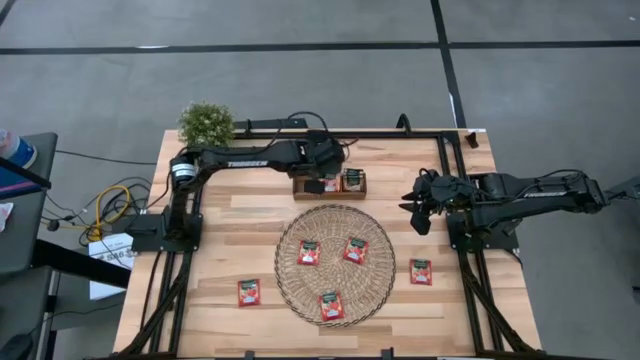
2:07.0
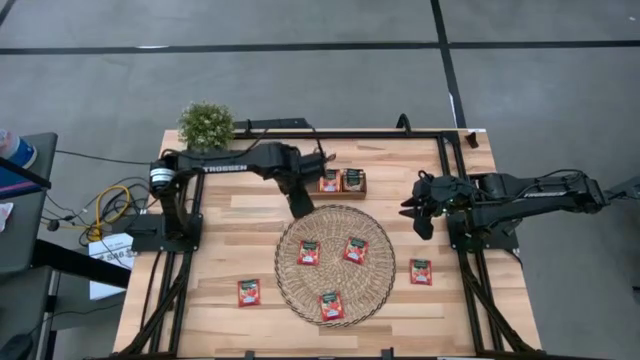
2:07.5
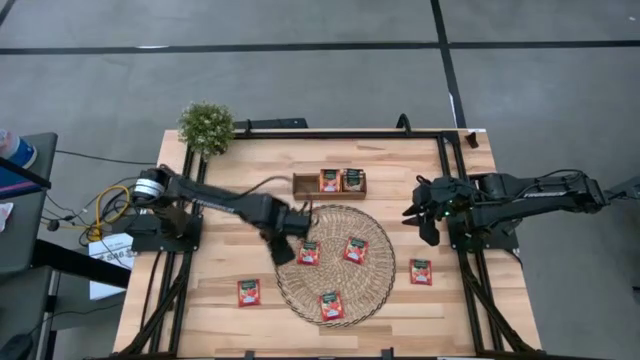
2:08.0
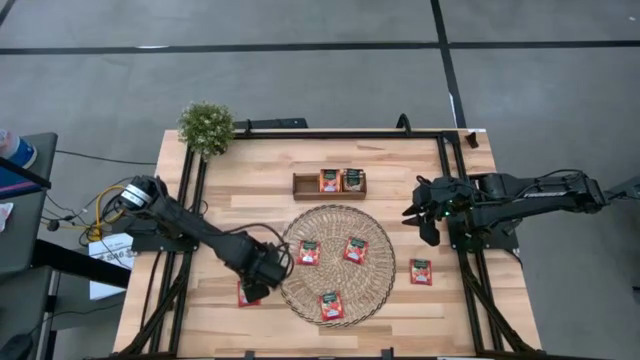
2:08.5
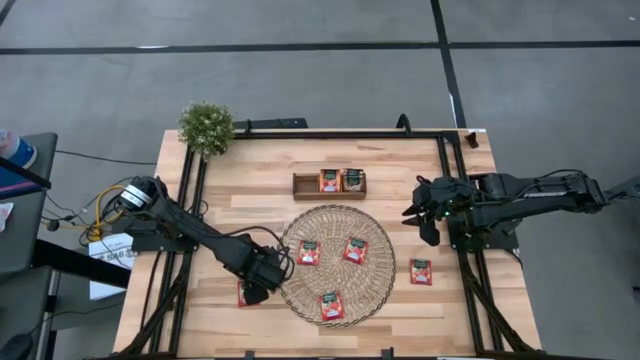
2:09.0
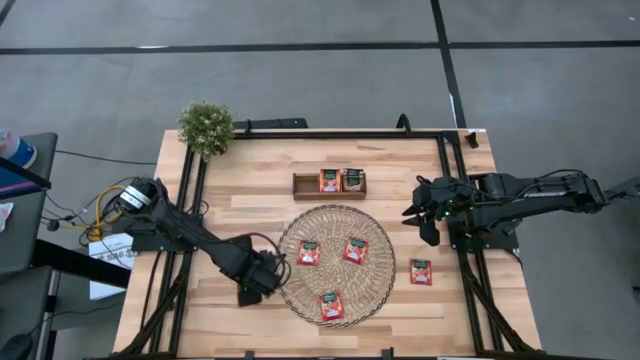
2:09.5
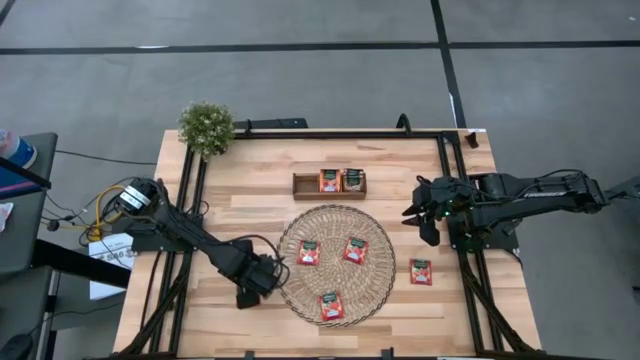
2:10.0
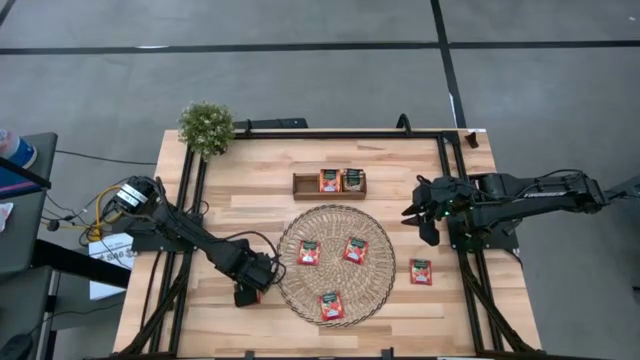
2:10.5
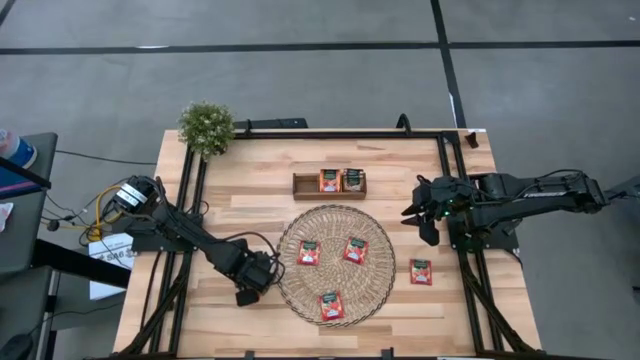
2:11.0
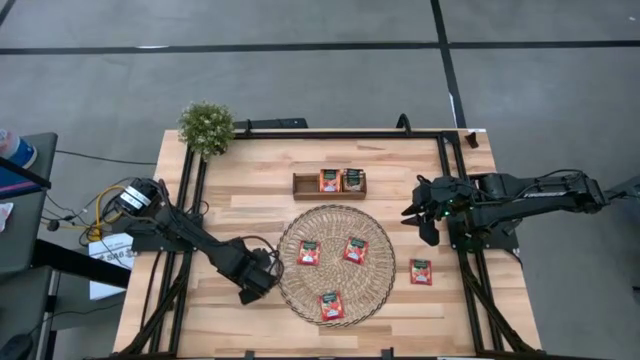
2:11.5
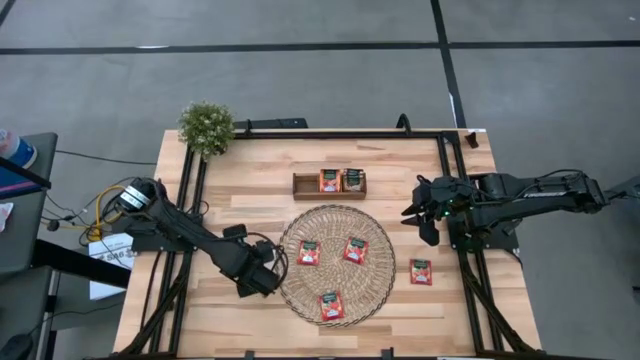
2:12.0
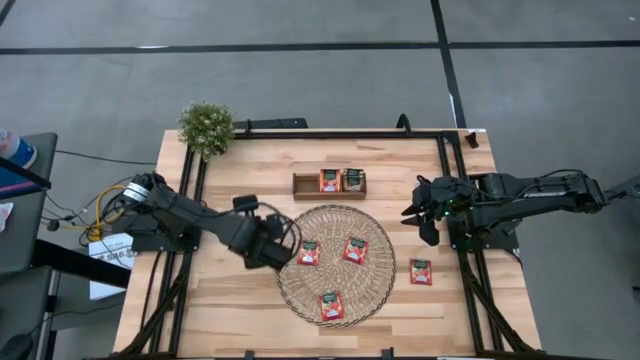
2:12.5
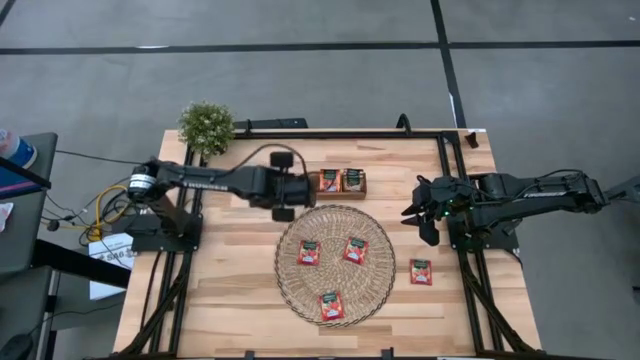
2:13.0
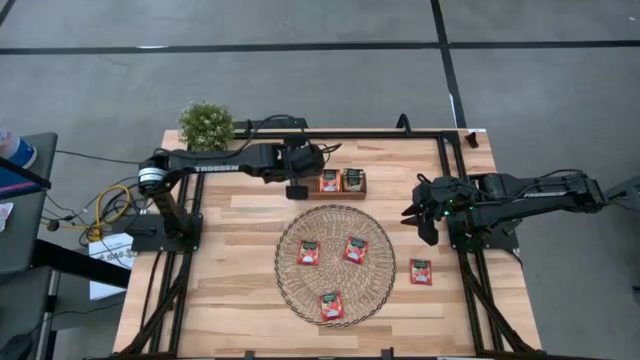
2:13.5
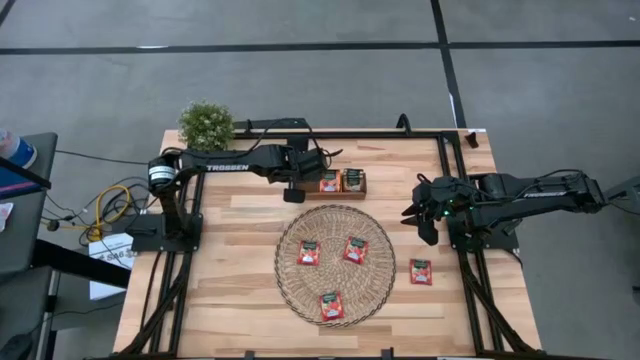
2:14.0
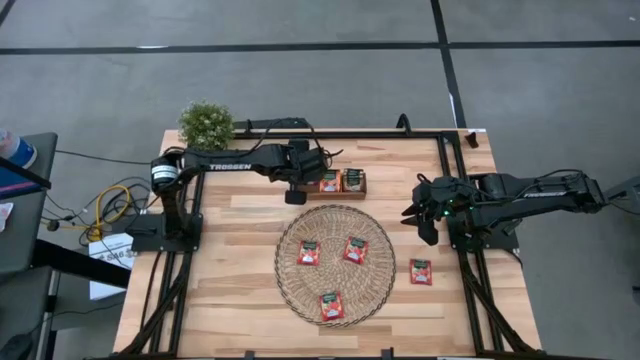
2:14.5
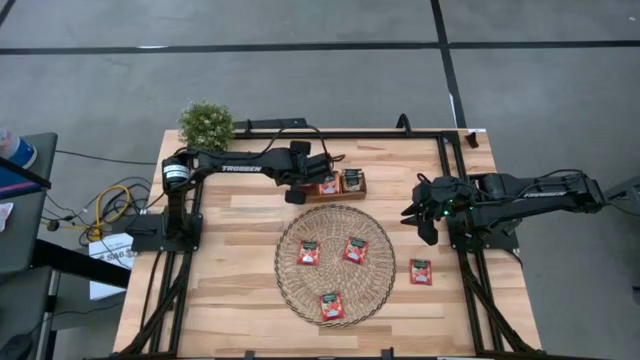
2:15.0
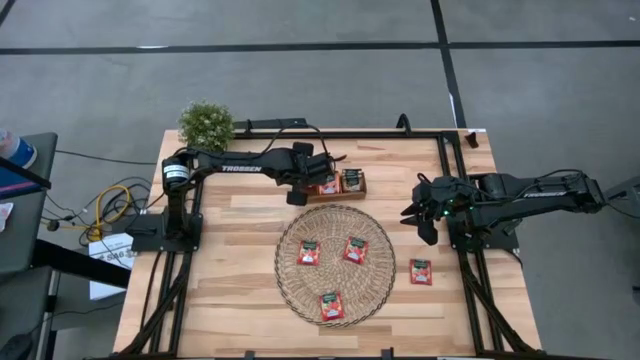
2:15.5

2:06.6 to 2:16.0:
Task: Pick & Place Tea
Put the red tea bag into the wooden organizer

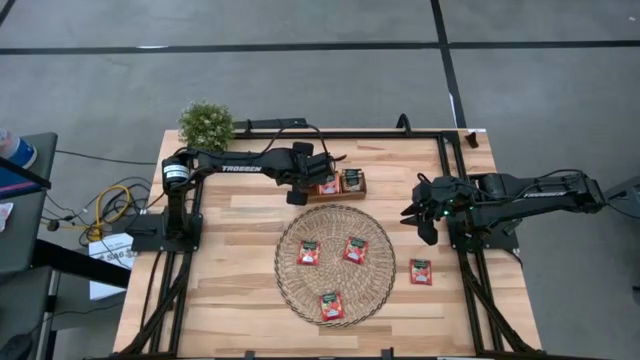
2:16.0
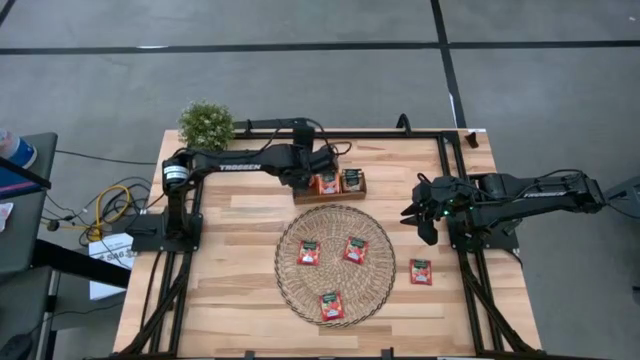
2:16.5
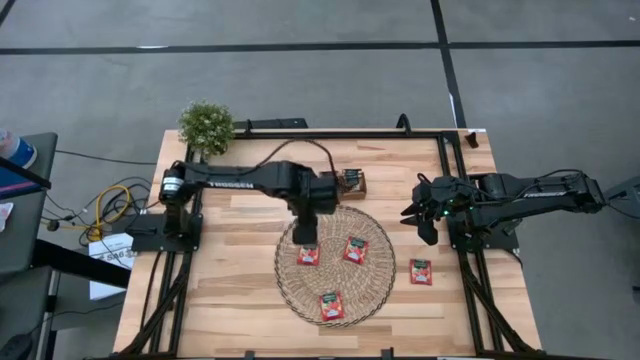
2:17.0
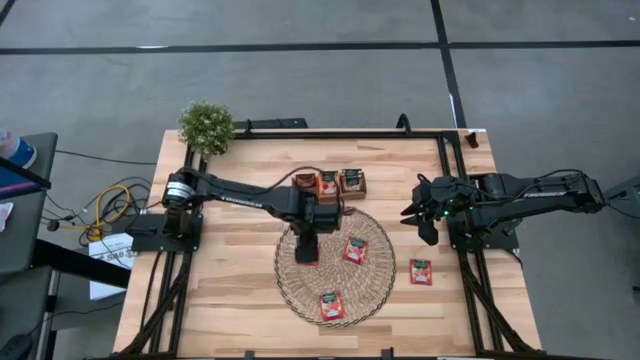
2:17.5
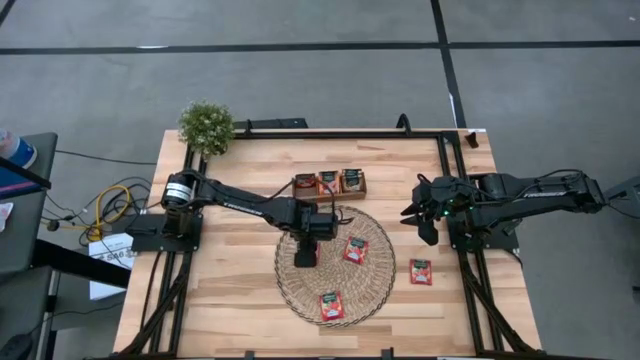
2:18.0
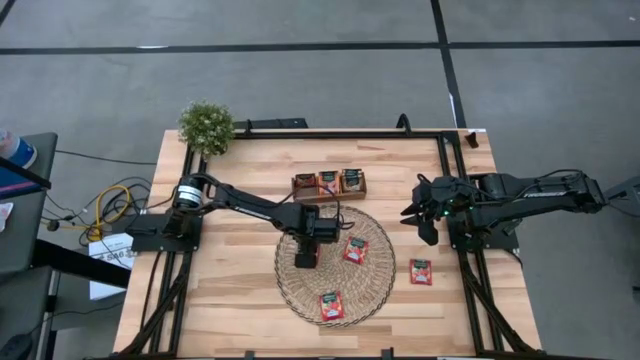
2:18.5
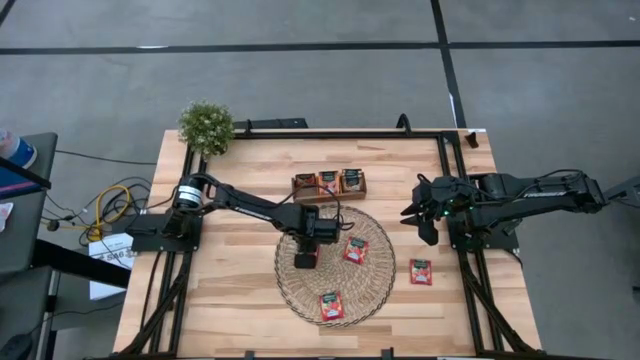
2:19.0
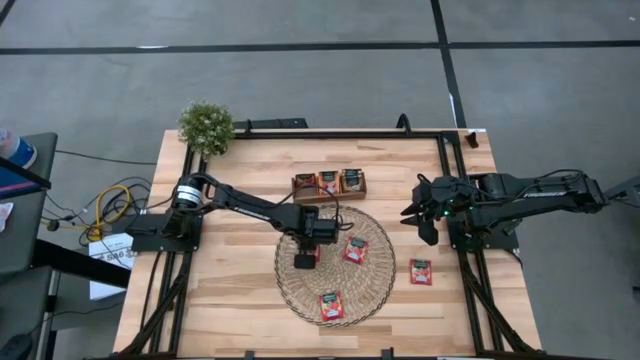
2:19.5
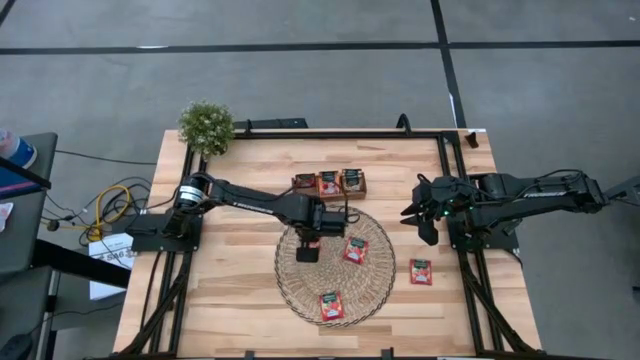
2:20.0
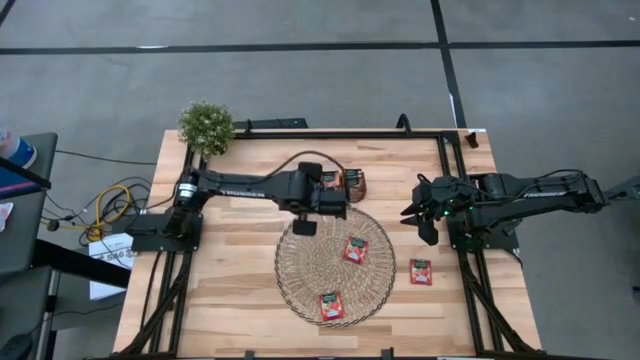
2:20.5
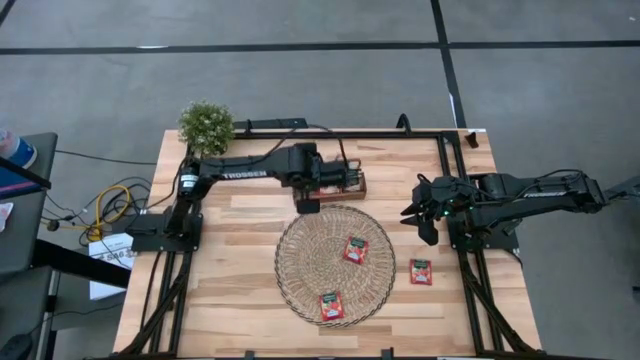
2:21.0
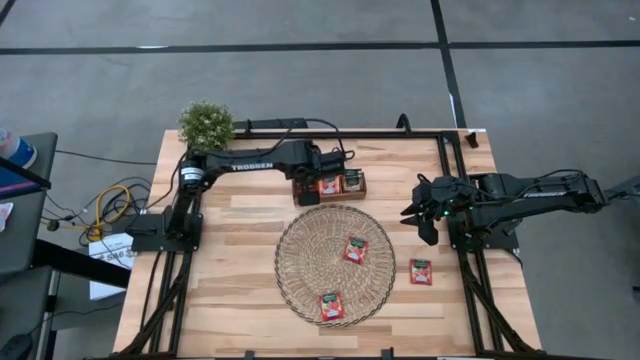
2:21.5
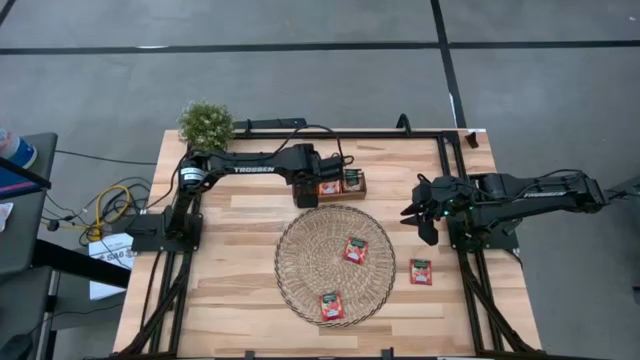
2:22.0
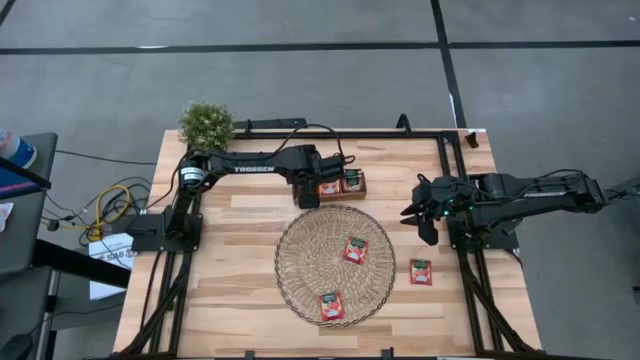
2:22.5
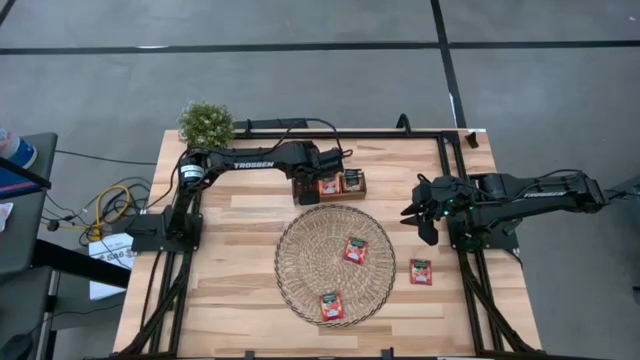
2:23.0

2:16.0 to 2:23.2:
Put the red tea bag into the wooden organizer

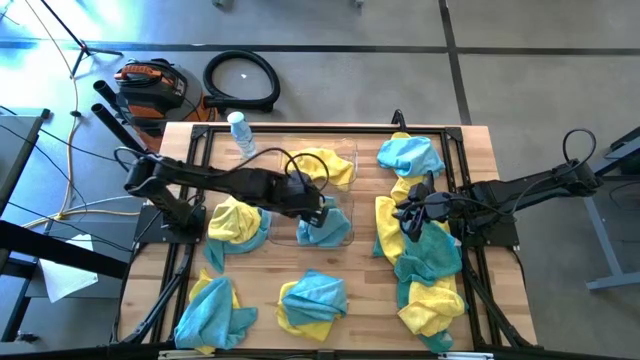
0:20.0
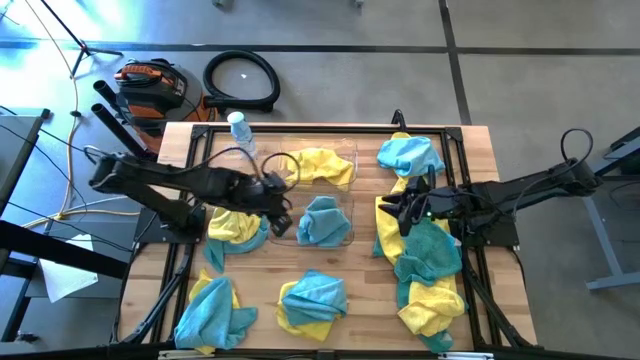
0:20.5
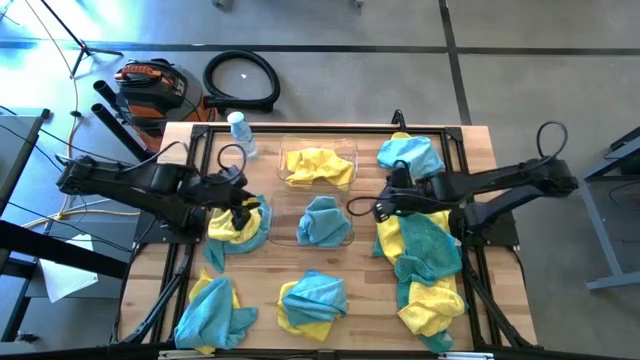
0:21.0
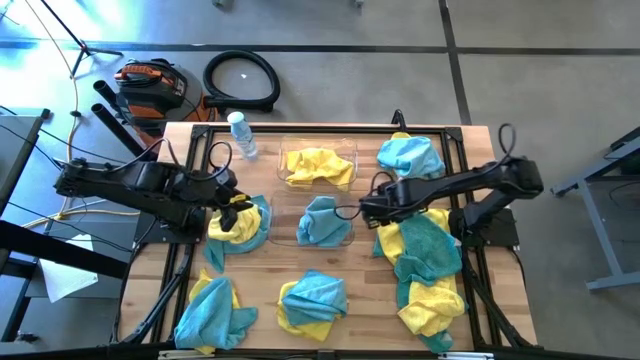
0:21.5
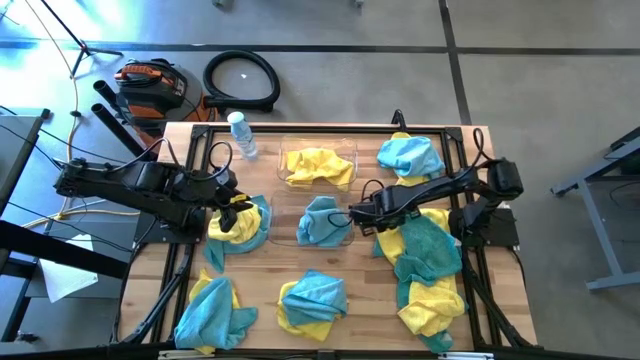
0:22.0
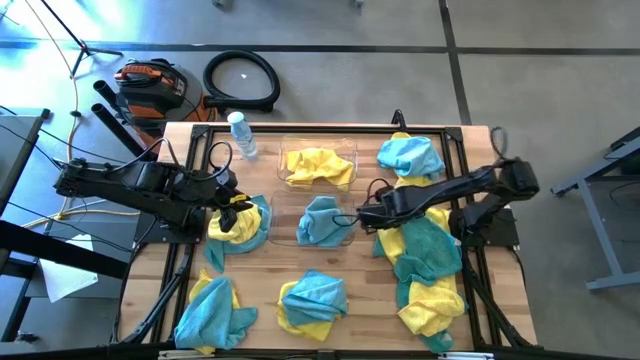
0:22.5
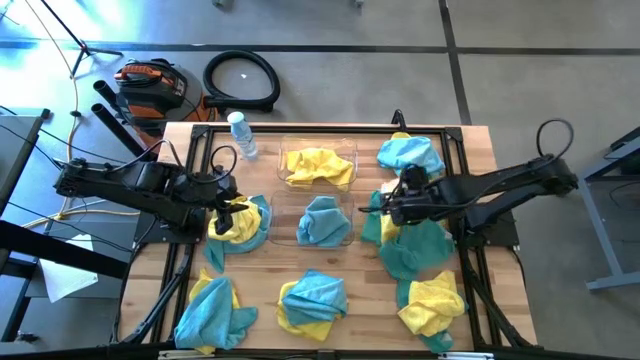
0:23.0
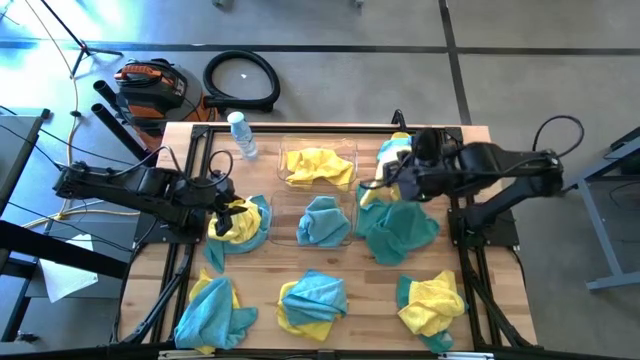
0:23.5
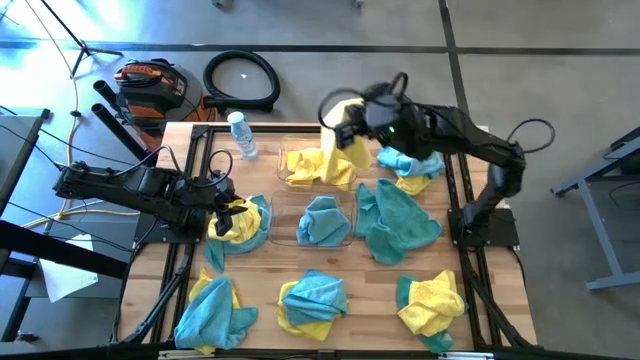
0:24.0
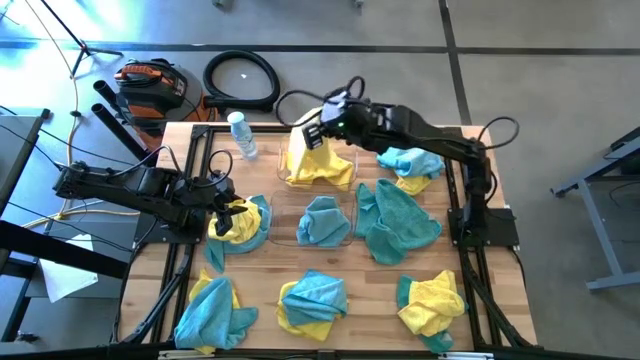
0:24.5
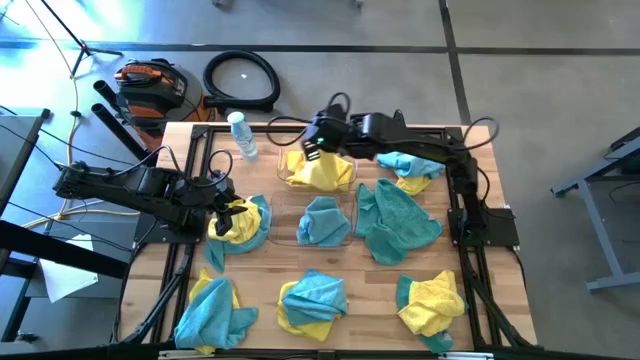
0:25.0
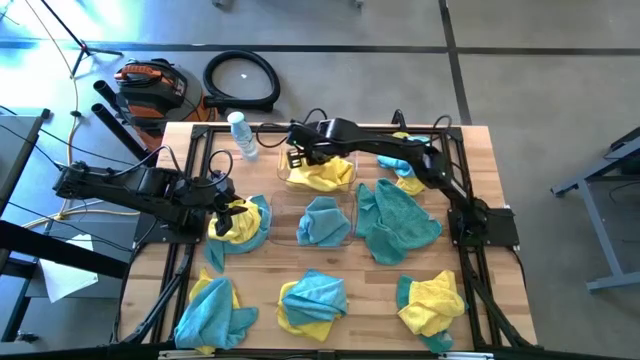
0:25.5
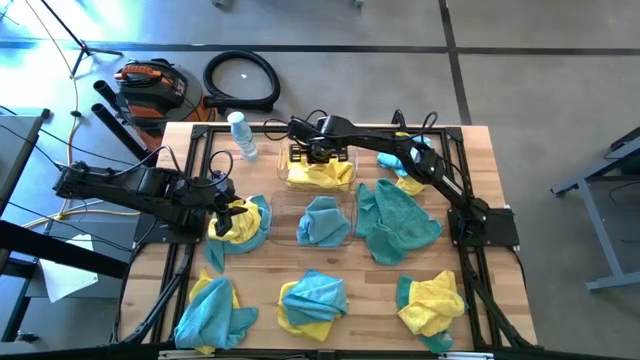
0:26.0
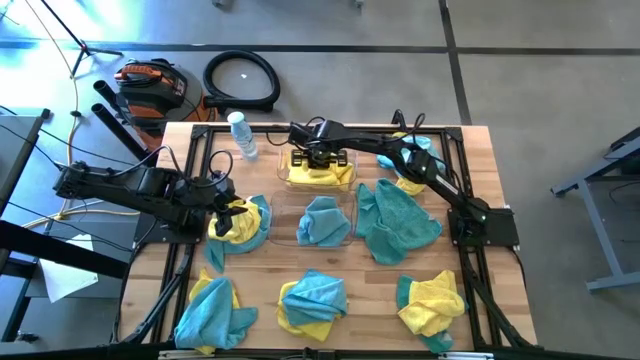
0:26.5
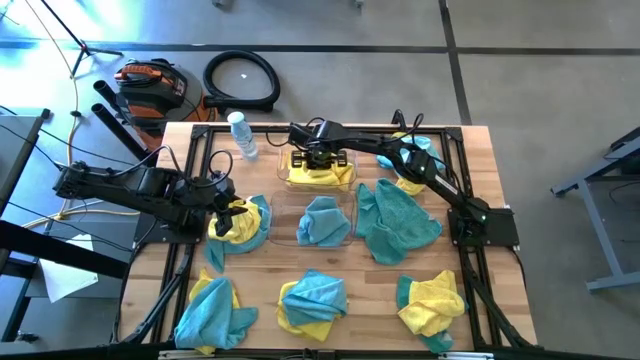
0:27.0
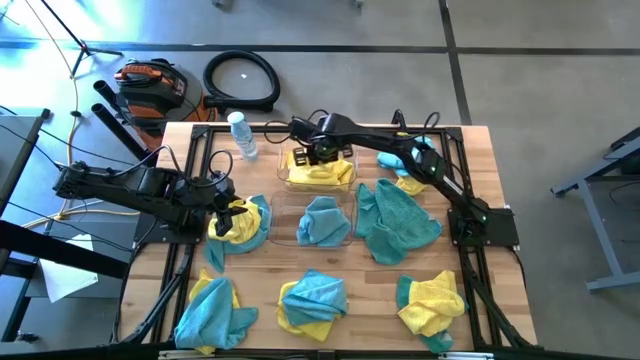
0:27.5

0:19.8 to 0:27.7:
Task: Sort microfiber towel by color & place in baskets
Put the yellow microfiber cloth into the top transparent bin
